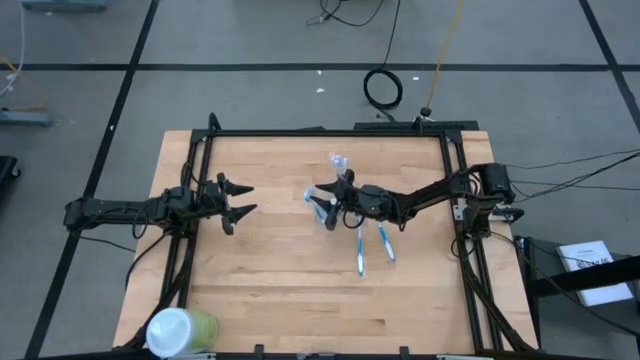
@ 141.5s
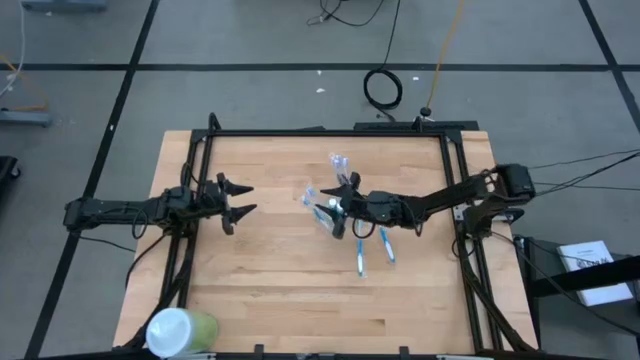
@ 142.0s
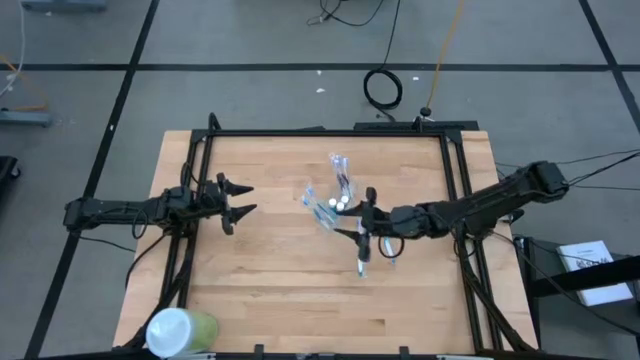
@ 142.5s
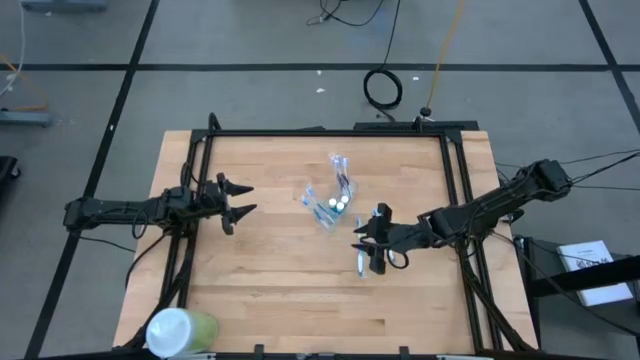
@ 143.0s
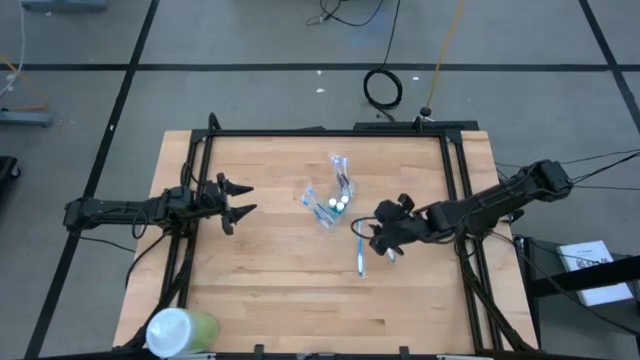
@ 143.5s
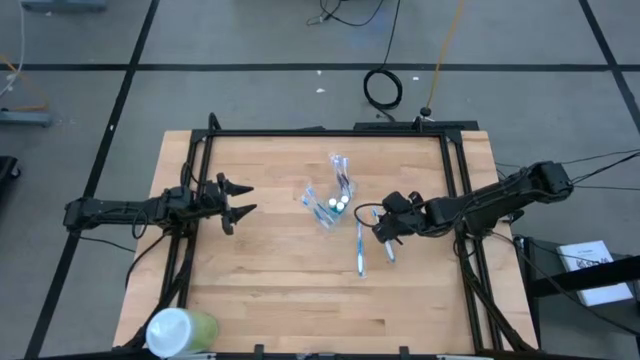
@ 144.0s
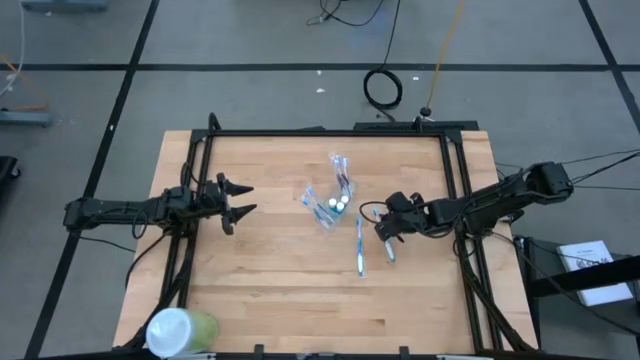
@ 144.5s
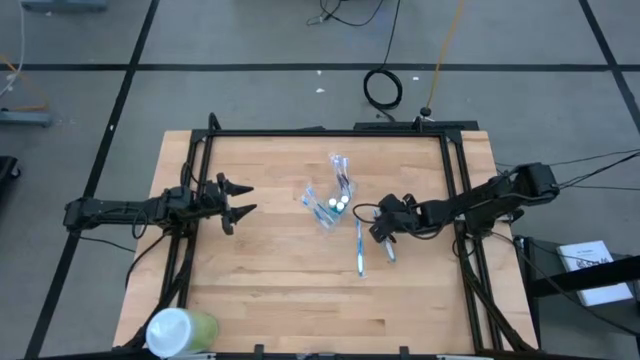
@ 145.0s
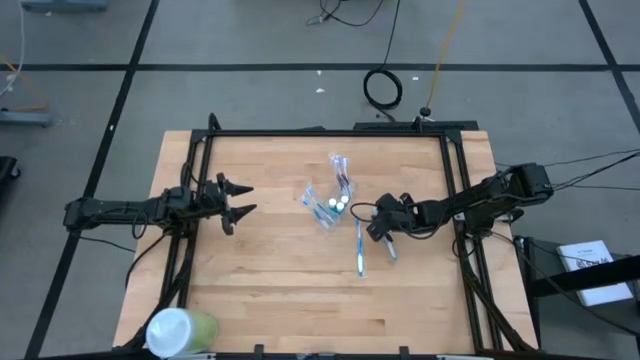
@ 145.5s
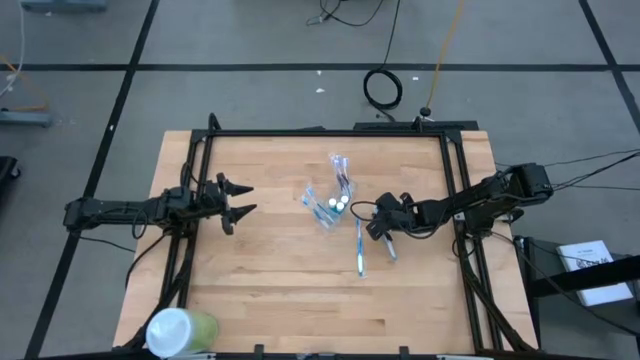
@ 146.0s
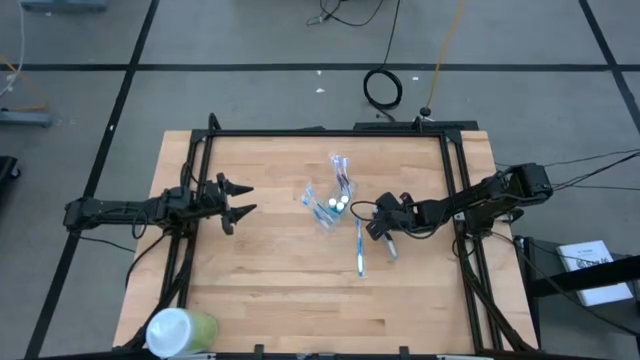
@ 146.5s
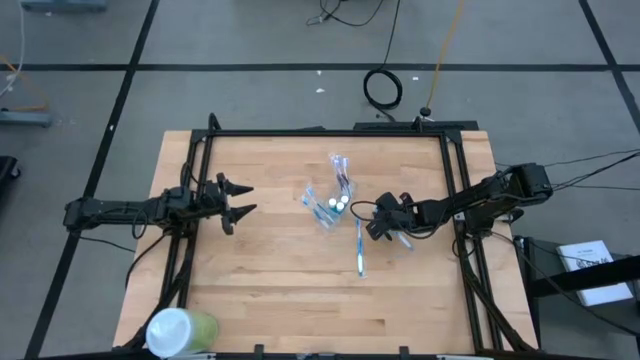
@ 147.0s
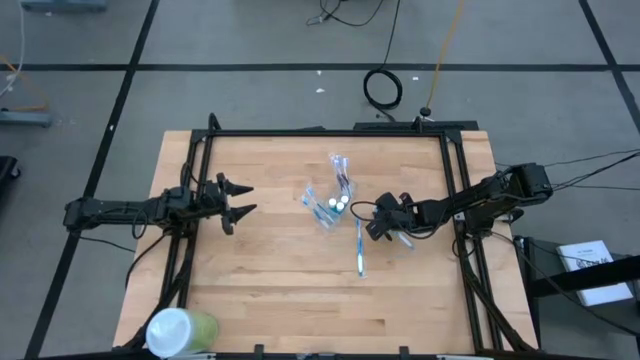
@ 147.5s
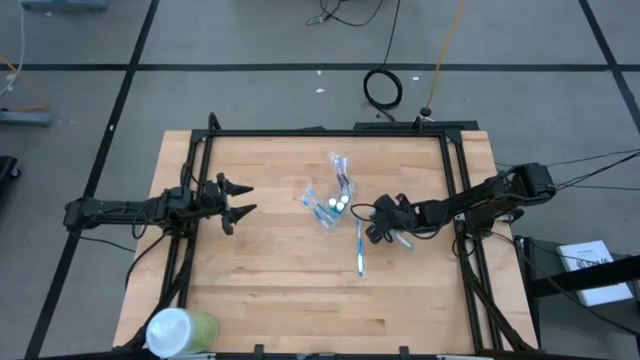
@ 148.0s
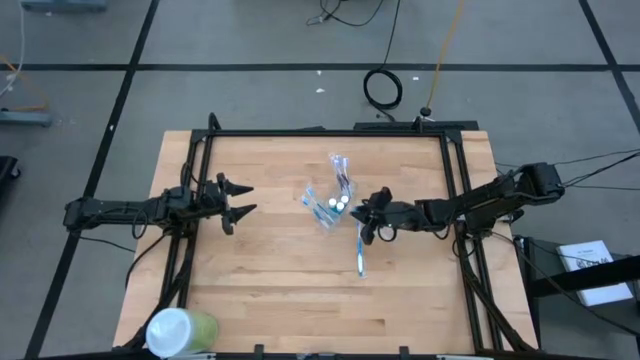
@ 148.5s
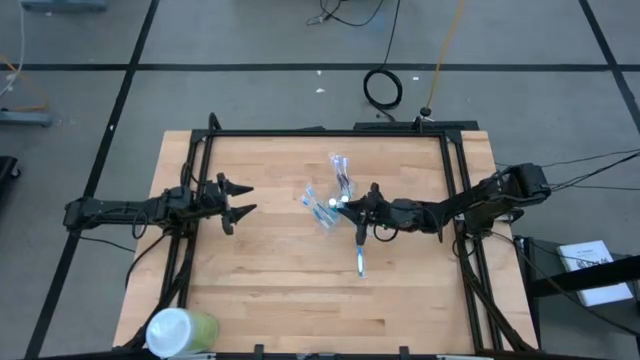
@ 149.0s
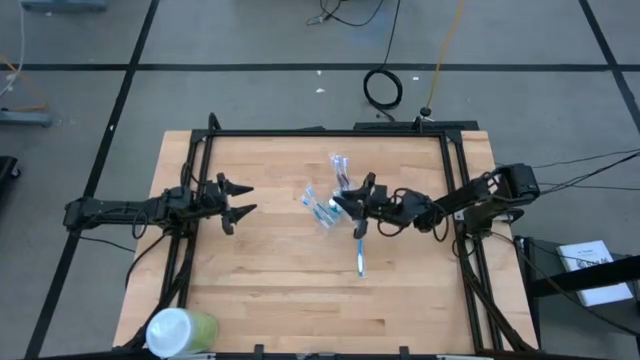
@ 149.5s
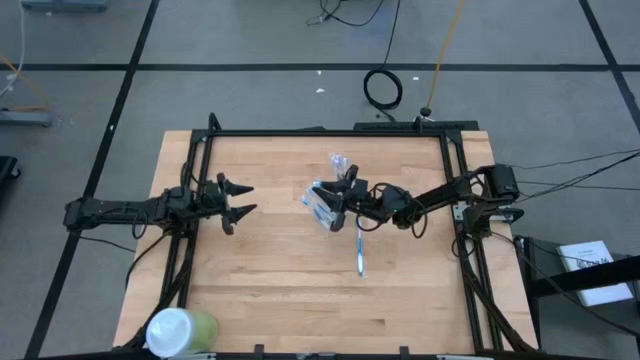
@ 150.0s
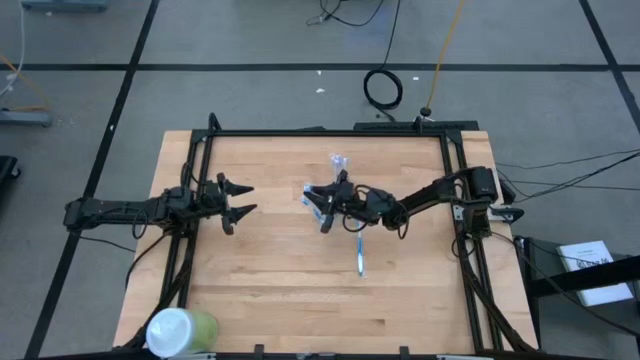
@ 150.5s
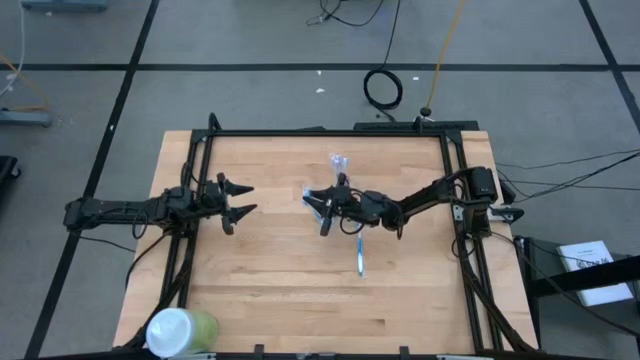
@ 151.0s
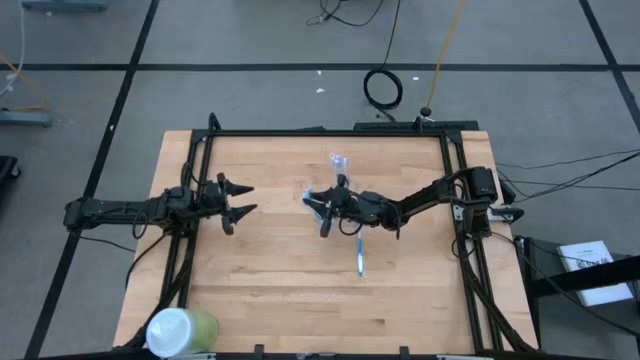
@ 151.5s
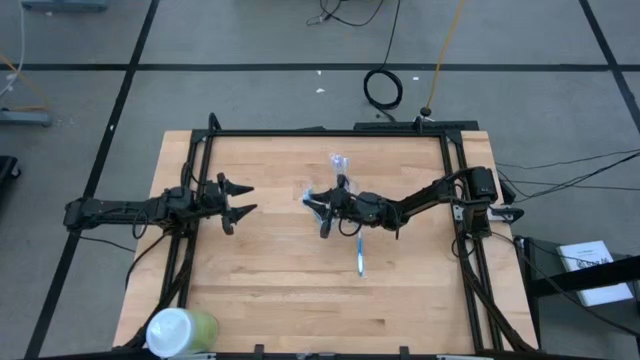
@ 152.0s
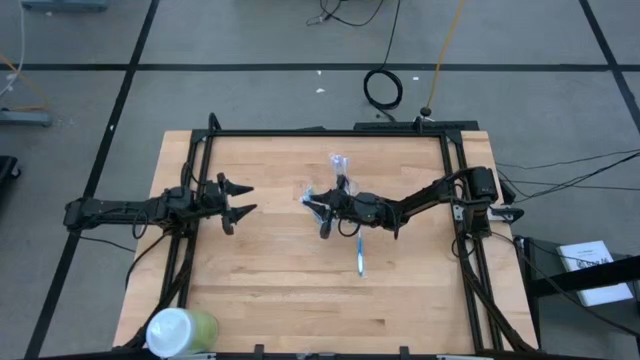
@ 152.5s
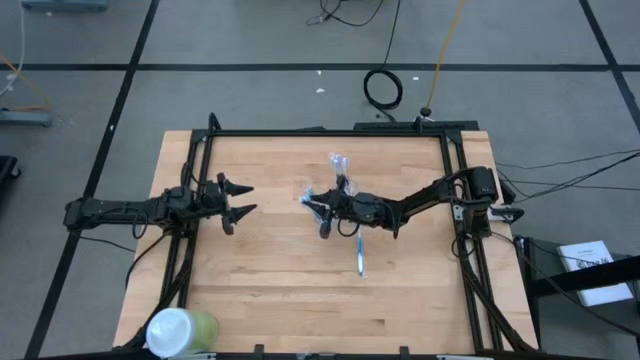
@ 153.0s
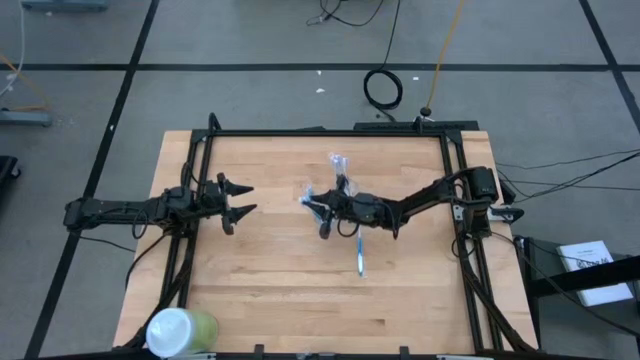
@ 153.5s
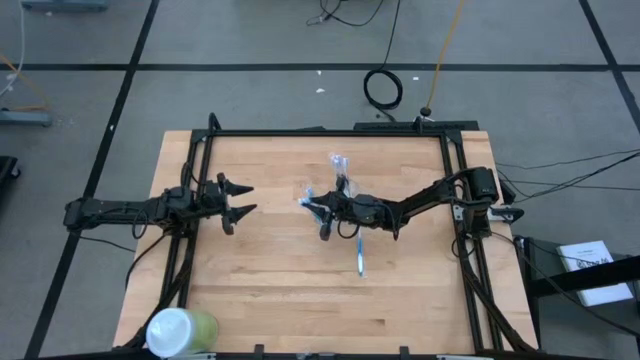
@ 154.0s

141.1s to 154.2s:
Task: Pick & Place toothbrushing station
Put the blue toothbrush into the transparent organizer

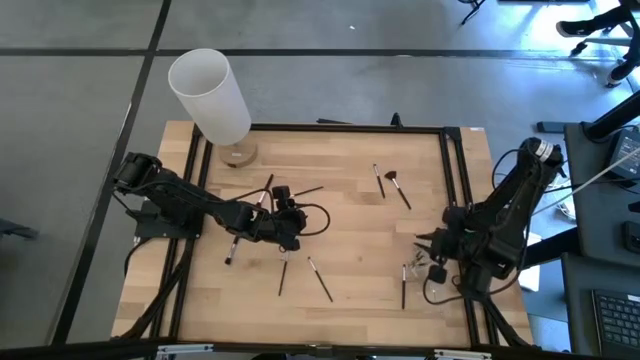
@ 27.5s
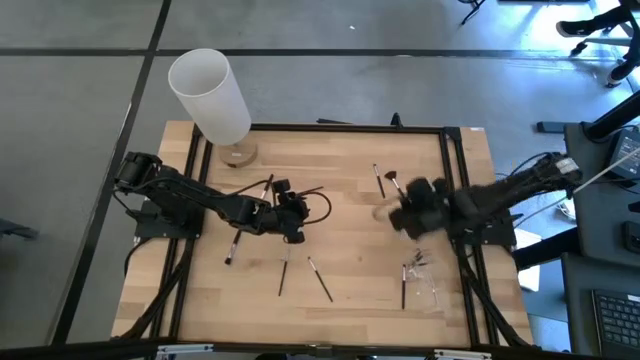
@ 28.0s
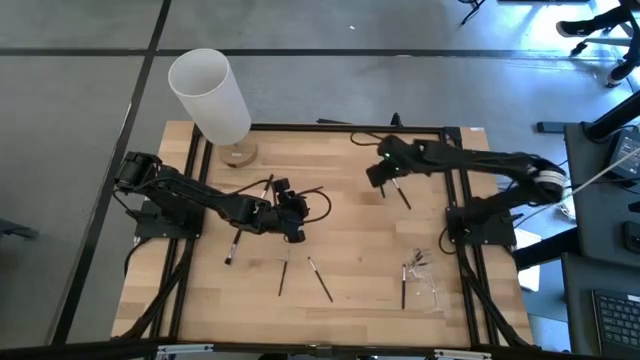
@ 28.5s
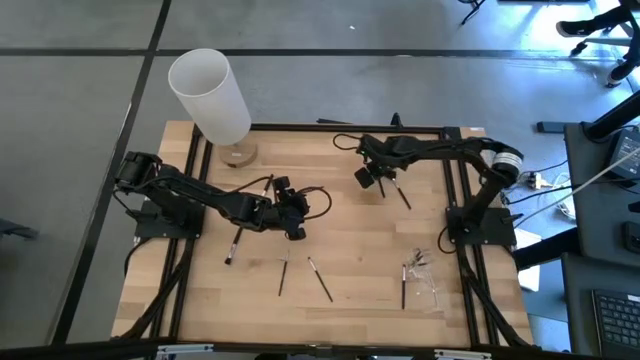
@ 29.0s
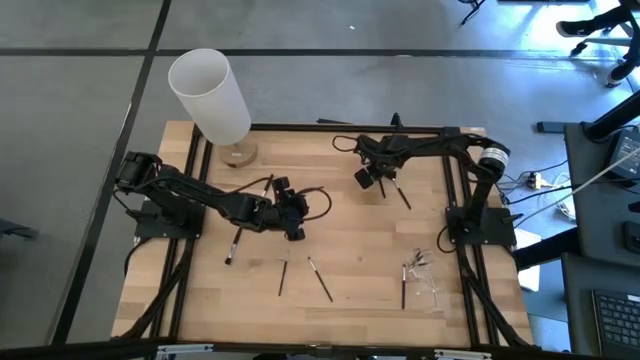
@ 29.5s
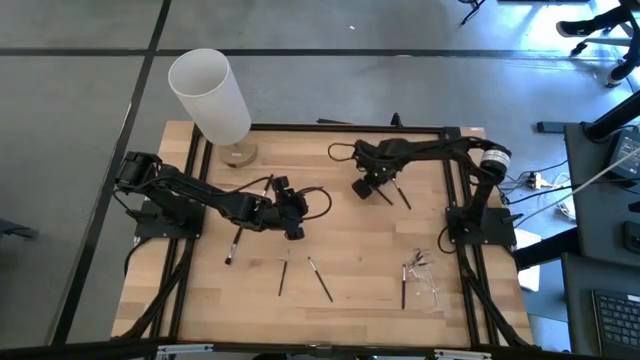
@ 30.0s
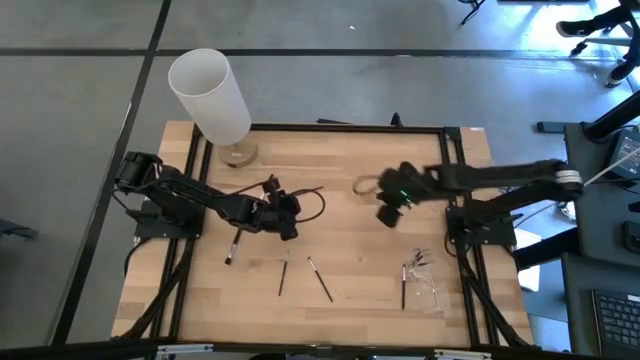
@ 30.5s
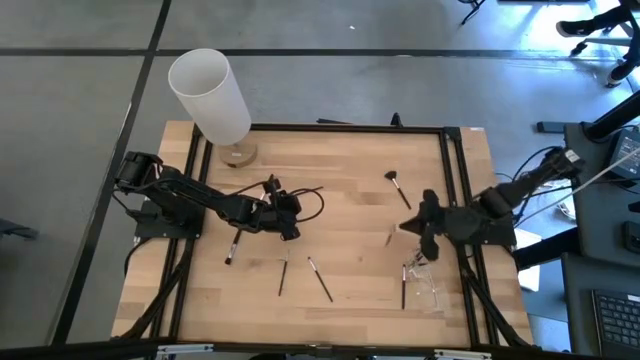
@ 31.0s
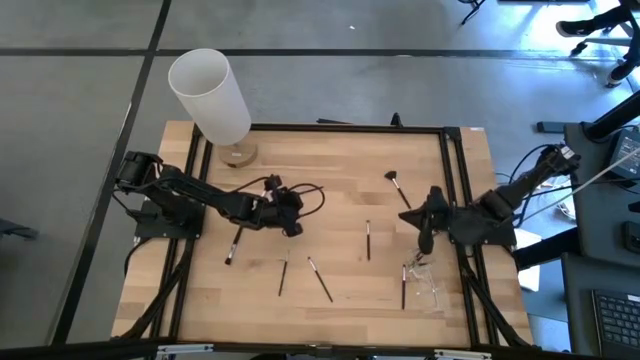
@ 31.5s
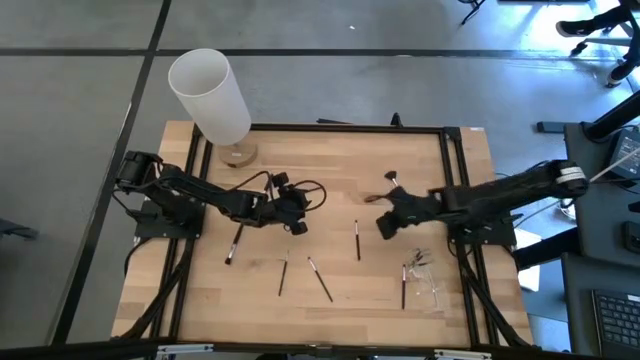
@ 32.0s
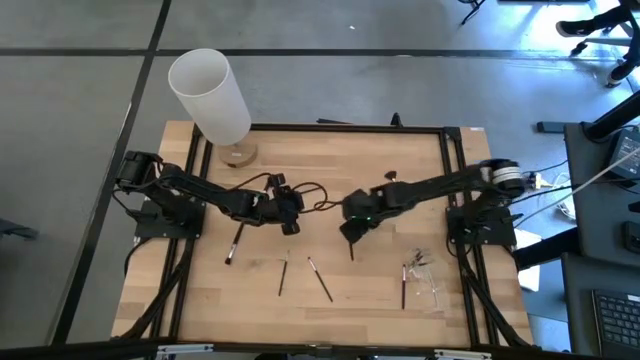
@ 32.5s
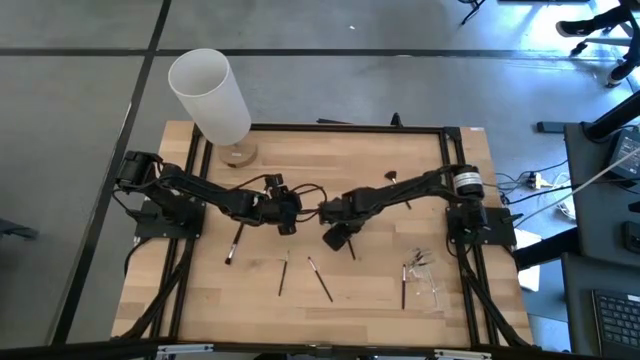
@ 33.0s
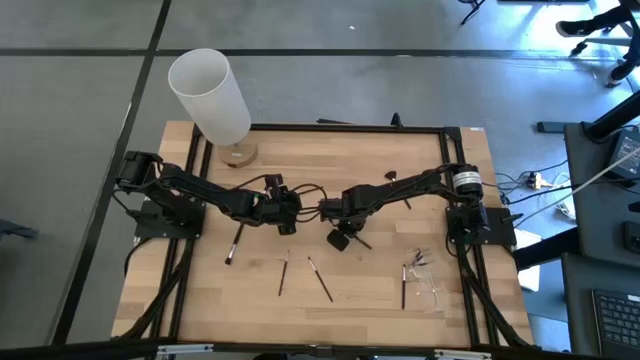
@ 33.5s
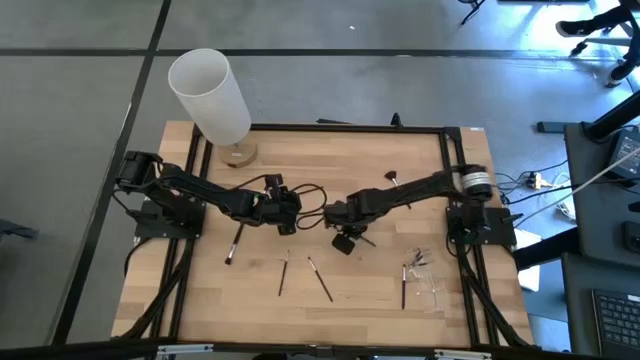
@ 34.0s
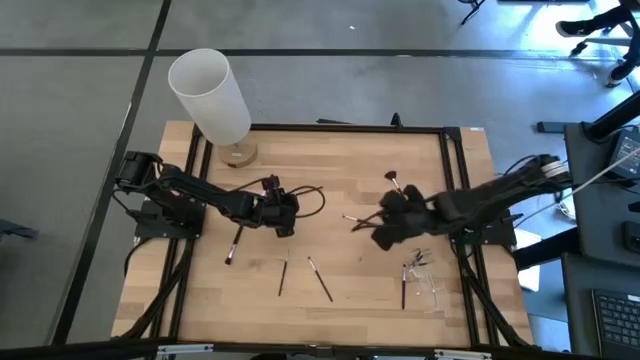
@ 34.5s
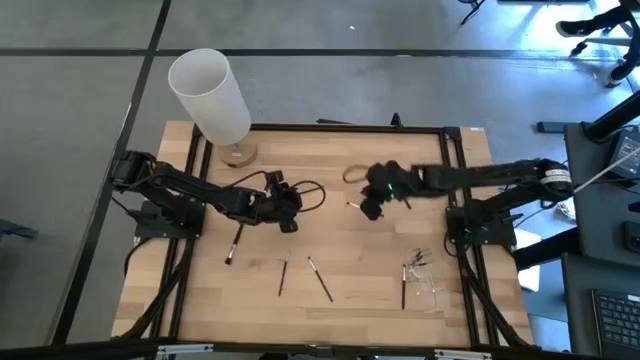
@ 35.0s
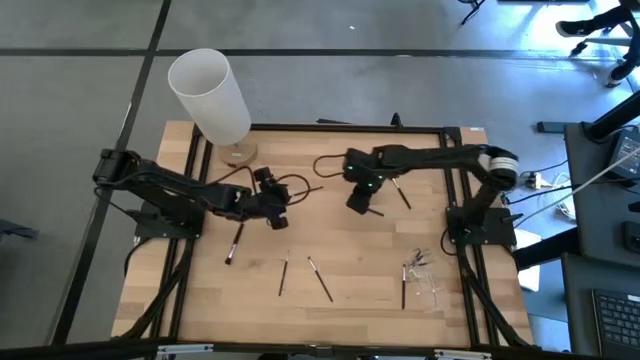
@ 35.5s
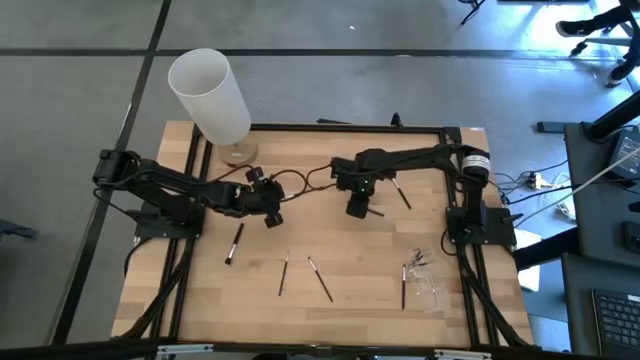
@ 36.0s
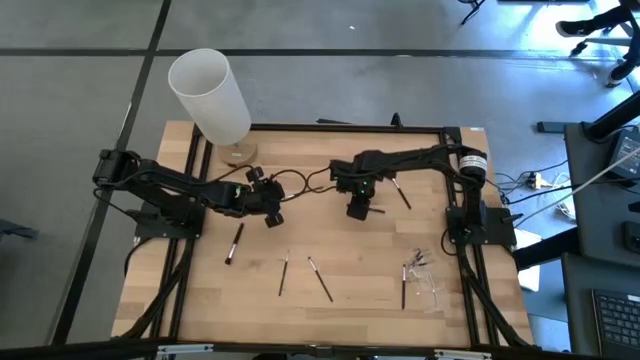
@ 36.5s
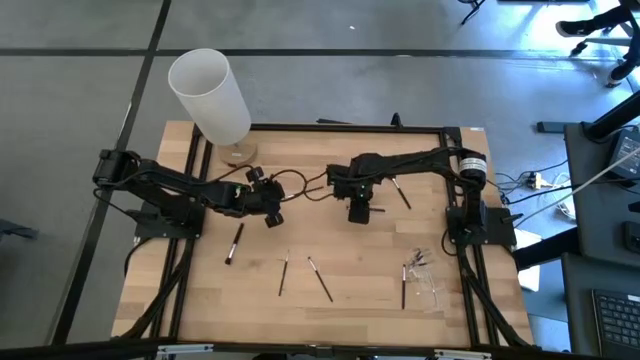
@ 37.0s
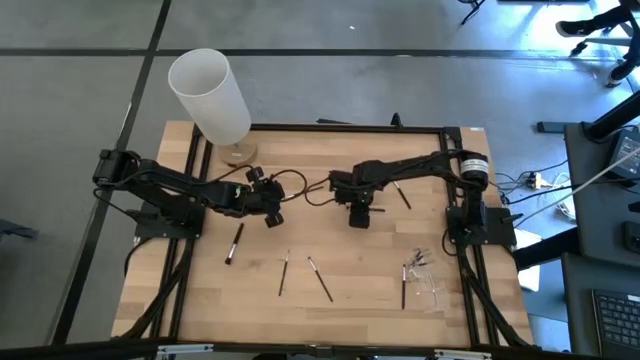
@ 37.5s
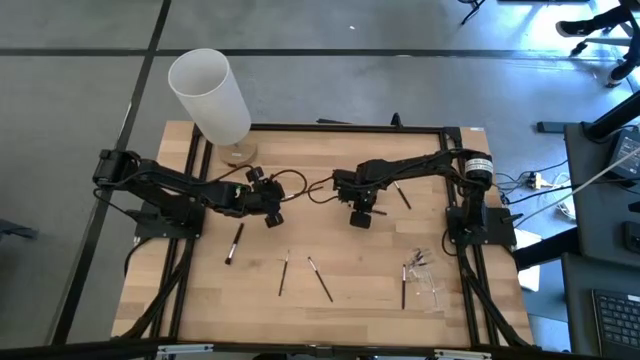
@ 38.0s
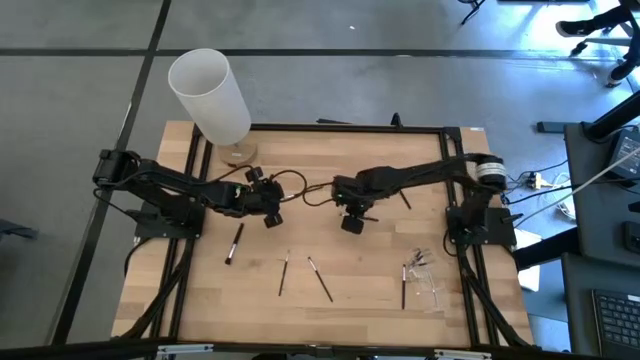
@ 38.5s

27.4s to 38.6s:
Task: Put items in baskets/containers
Put the black eyeshadow brush into the transparent organizer
